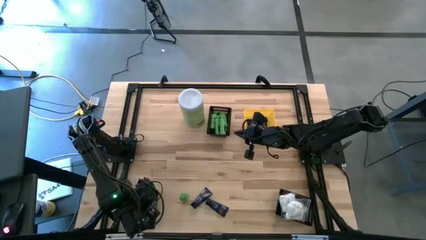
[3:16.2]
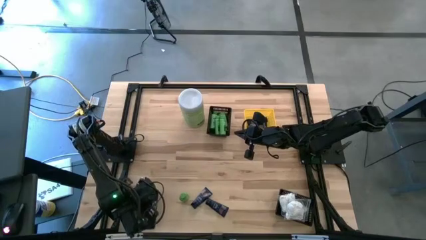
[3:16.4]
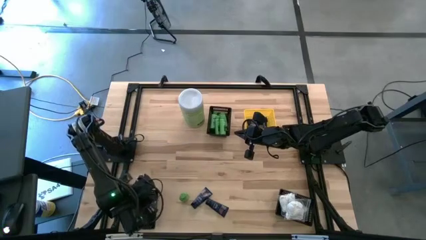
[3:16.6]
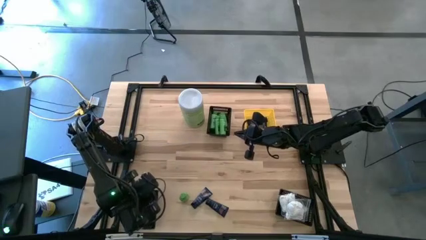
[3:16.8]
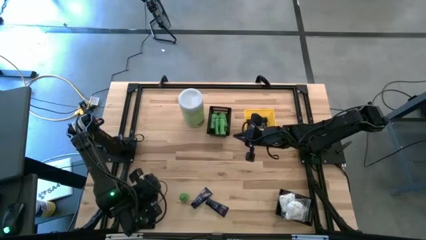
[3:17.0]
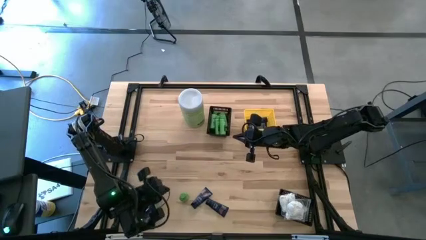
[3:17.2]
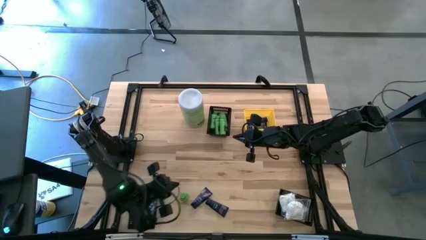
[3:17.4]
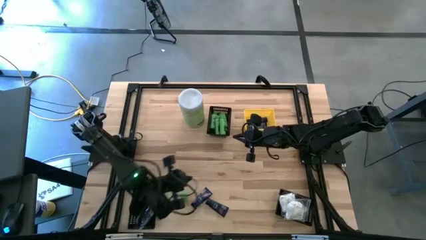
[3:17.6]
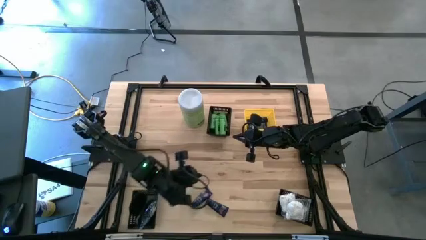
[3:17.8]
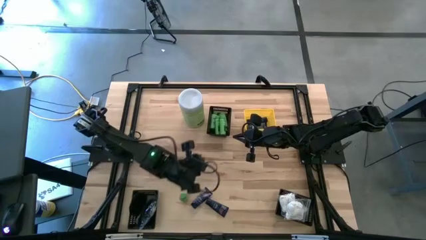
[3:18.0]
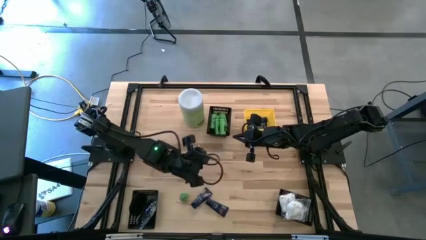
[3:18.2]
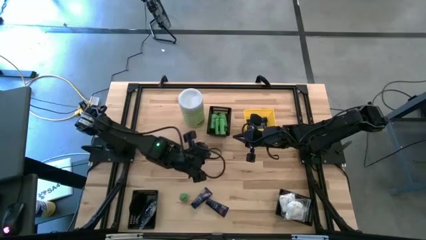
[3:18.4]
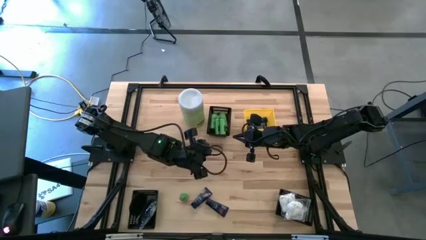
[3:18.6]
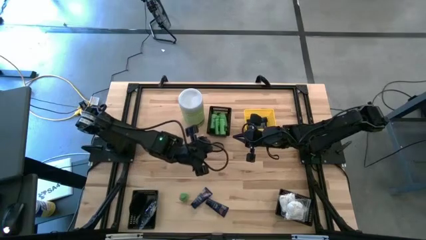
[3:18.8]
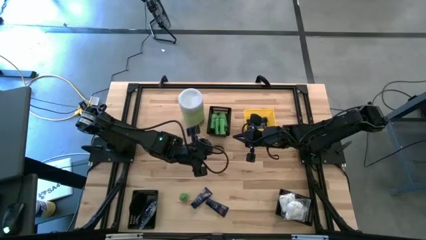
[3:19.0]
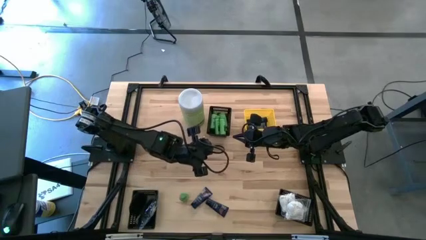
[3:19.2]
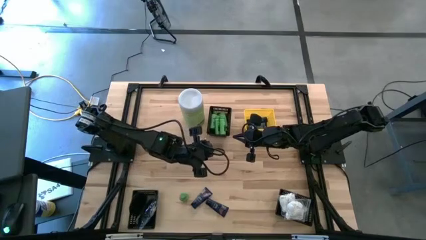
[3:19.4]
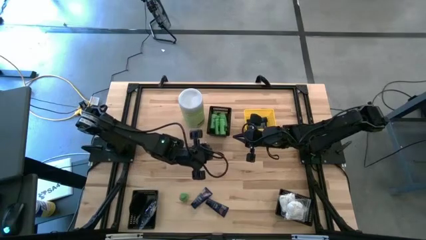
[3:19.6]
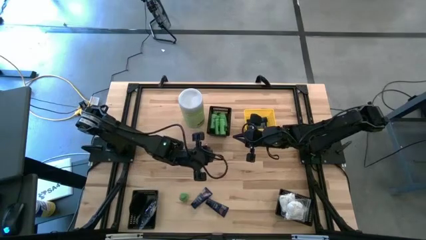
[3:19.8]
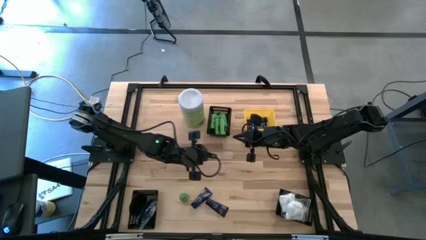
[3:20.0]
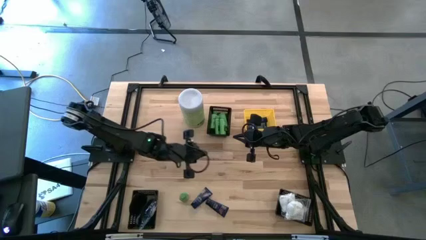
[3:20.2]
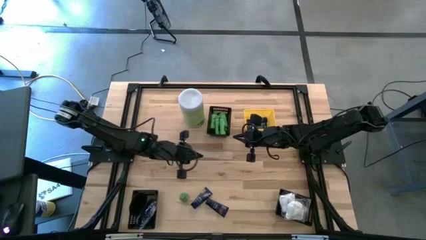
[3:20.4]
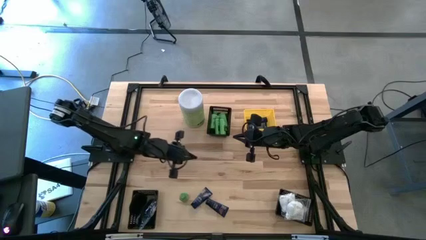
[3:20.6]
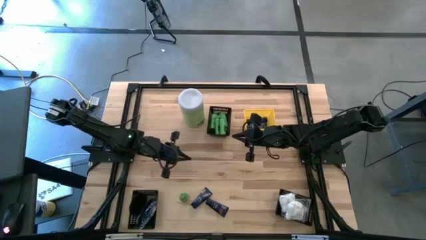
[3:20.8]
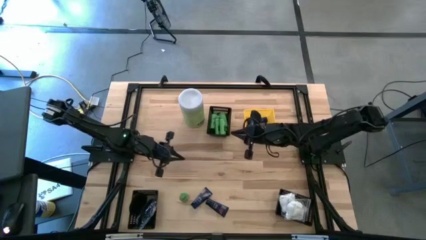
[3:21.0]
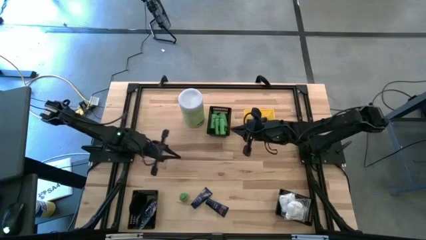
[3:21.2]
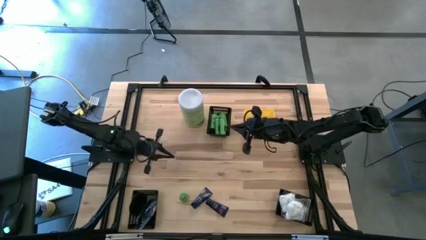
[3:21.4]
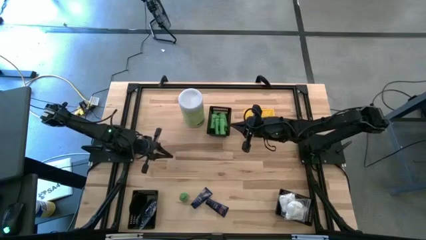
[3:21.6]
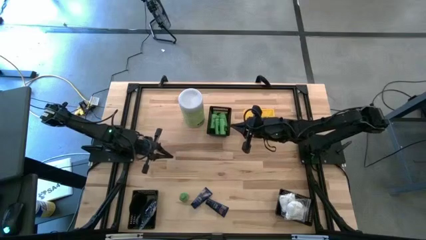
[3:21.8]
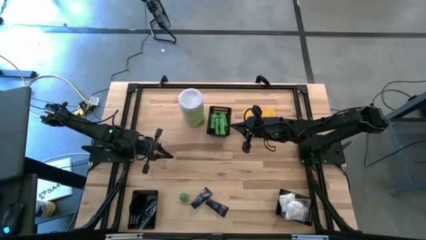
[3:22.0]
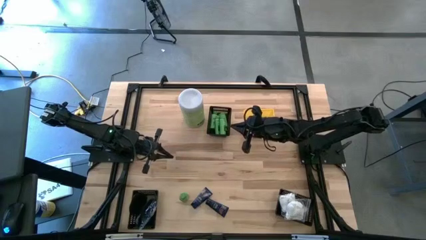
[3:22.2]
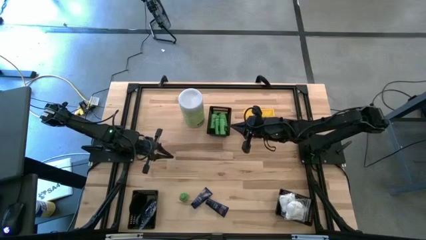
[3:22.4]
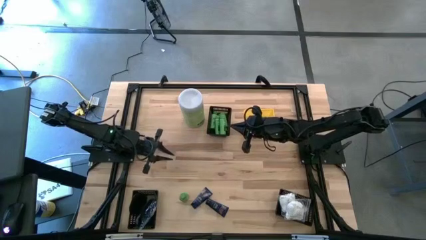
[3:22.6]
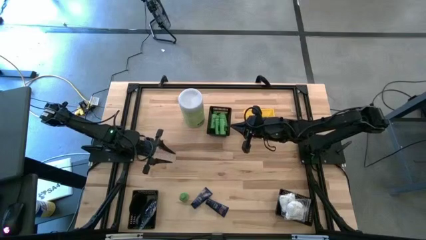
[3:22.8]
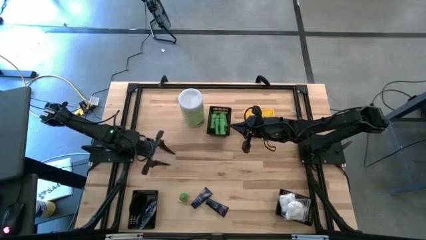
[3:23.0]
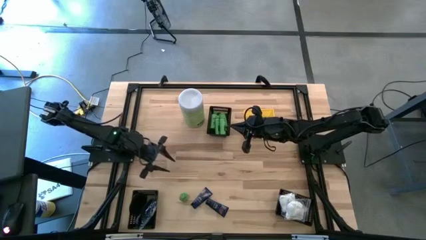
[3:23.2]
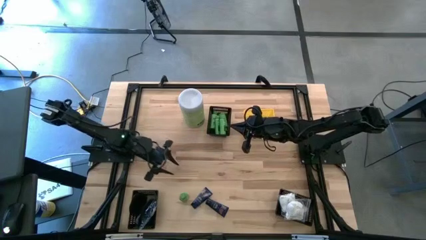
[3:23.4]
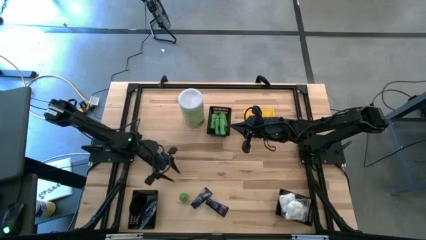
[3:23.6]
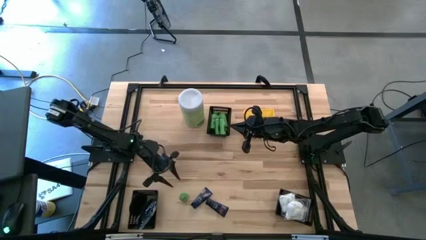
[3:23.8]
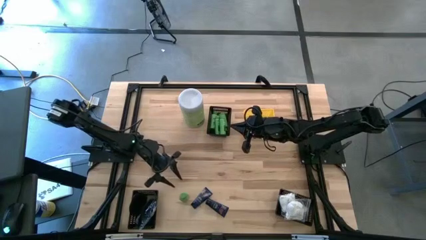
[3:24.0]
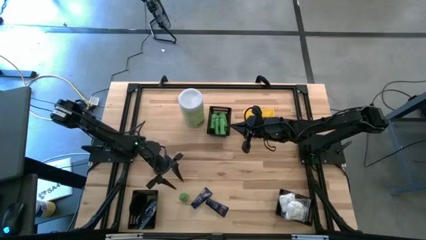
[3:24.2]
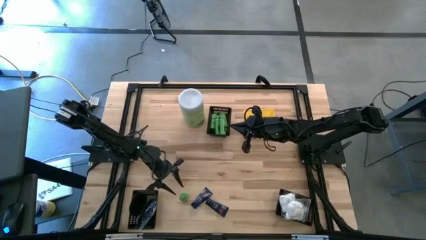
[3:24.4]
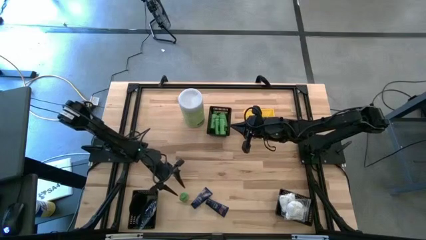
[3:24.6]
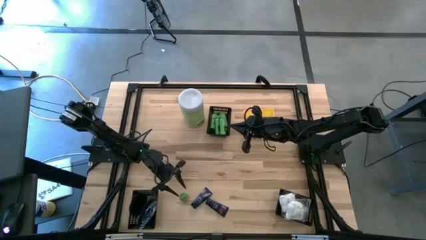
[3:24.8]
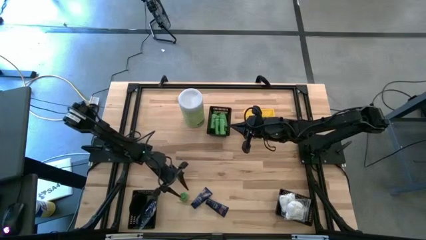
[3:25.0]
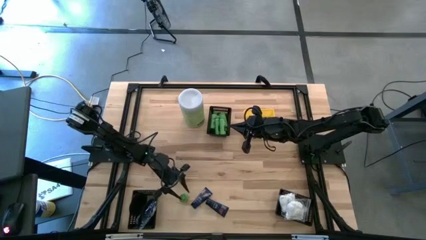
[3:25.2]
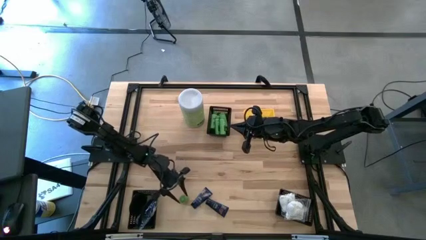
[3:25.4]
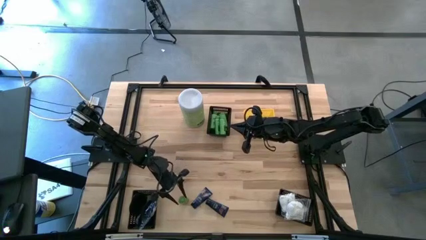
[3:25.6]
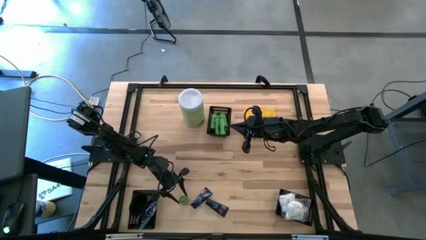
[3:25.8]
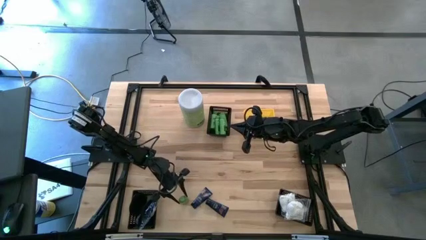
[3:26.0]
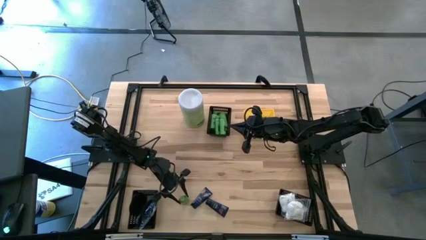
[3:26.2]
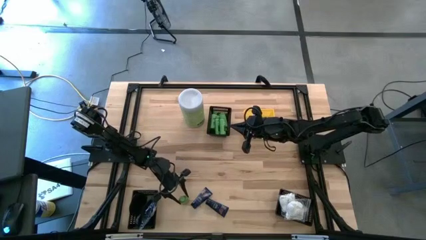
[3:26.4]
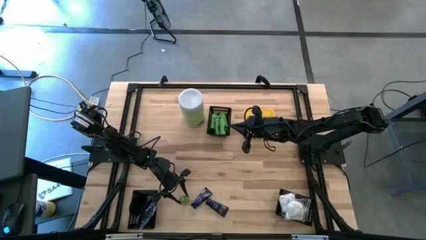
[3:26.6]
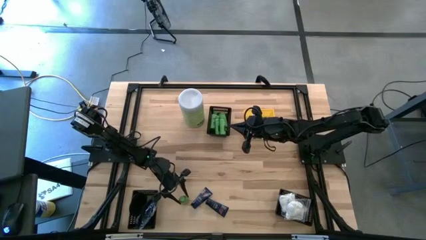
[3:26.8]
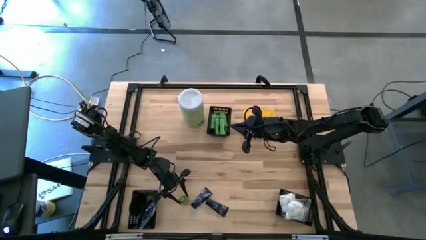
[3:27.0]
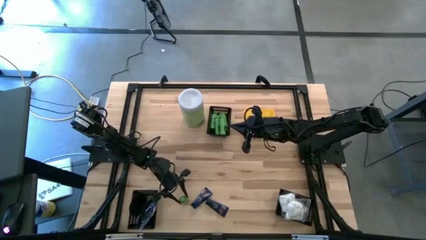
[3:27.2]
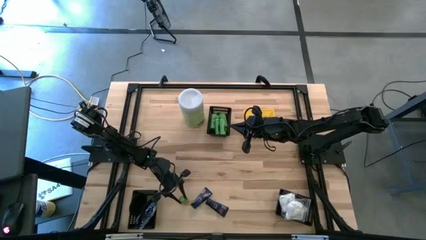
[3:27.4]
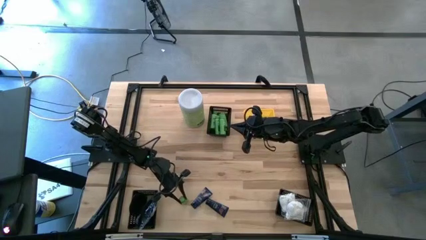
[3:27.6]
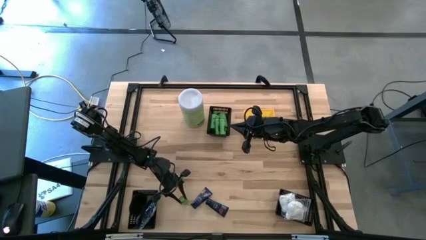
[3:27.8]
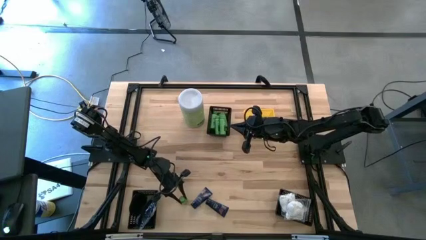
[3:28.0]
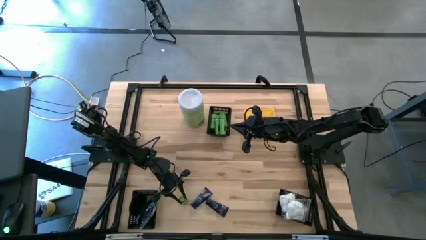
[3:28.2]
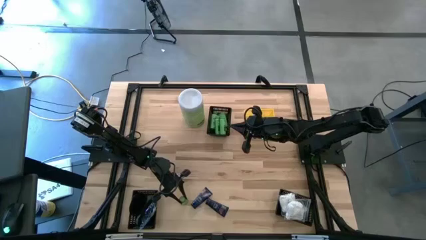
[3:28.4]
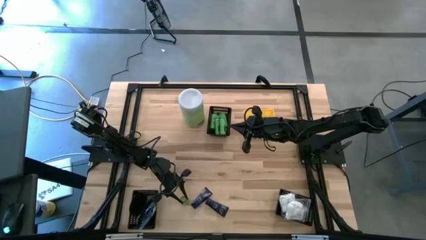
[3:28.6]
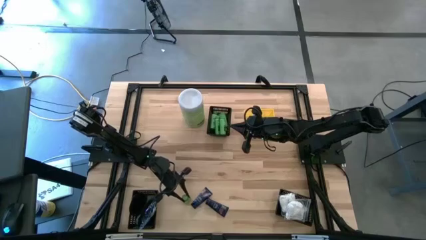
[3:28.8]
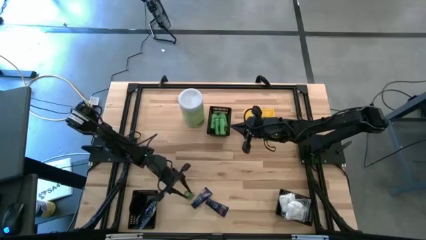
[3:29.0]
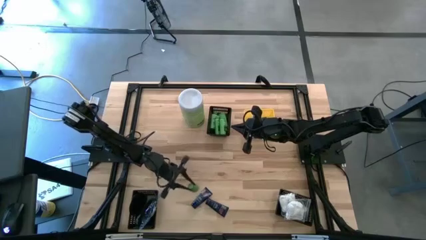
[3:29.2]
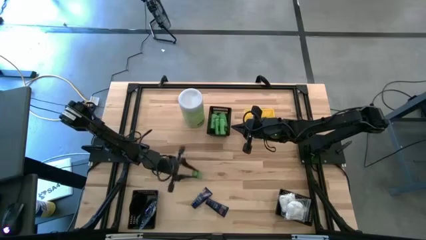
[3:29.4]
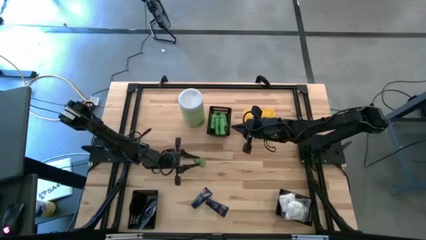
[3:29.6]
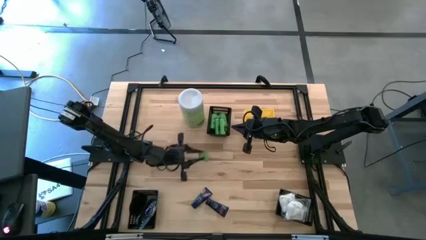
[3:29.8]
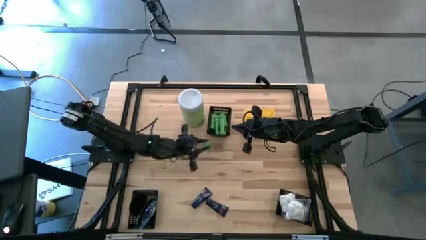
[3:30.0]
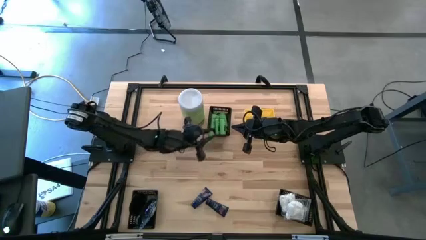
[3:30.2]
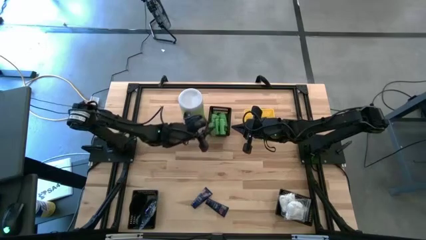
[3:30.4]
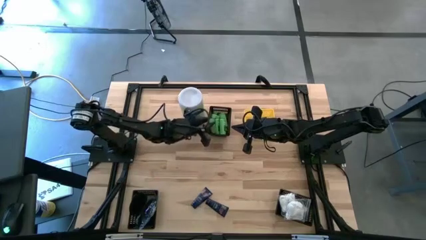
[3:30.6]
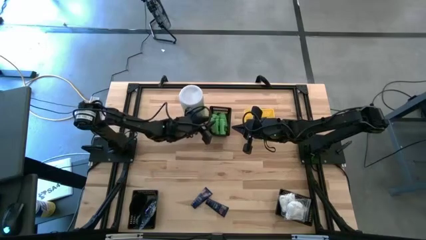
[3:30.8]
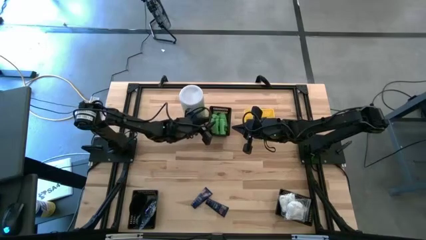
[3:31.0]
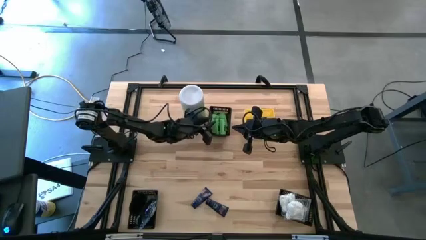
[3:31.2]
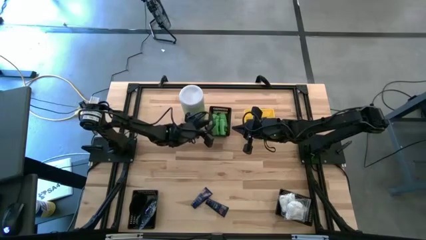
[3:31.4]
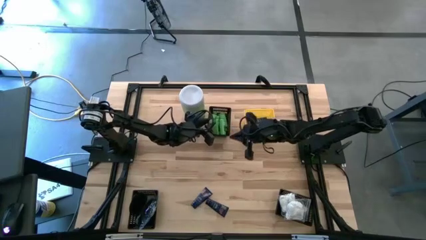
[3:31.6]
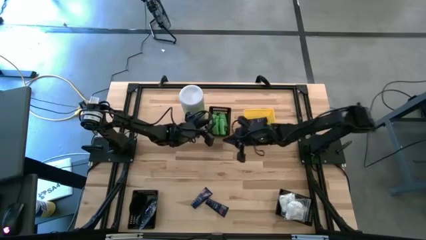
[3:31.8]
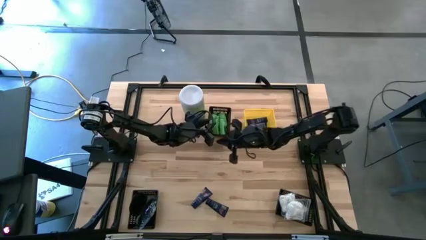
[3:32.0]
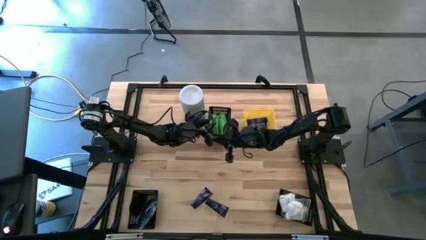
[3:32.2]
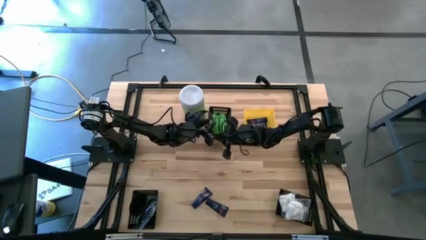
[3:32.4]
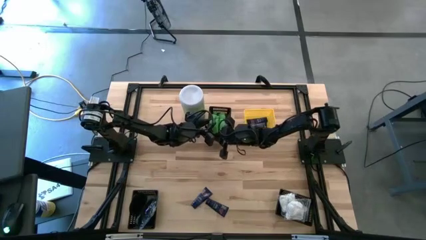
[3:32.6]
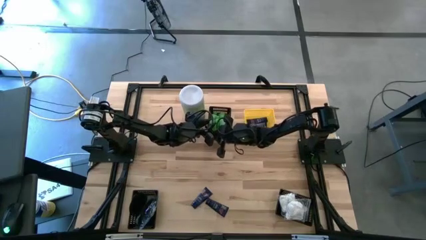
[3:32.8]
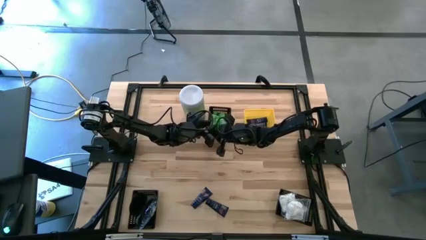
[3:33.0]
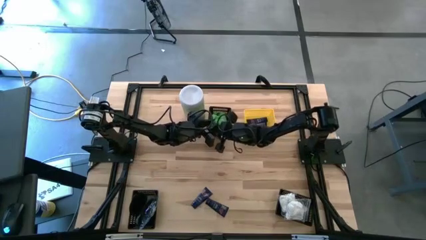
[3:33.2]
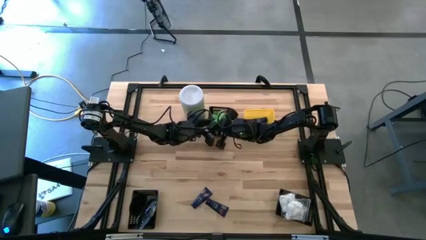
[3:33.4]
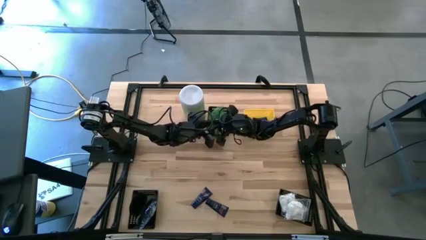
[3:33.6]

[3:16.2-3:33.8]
Task: Pick & Place Travel size toiletries
Put the green shampoo bottle into the top black bin
